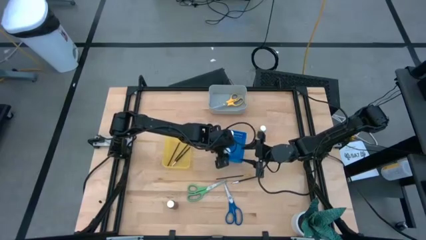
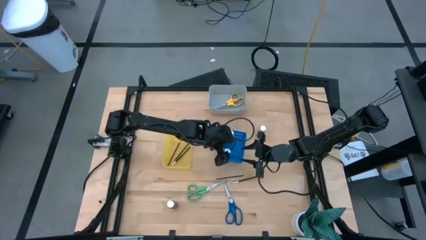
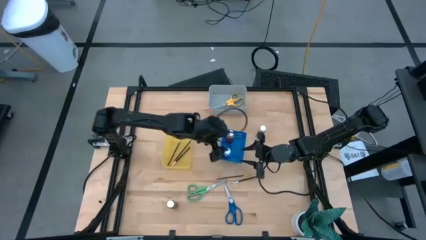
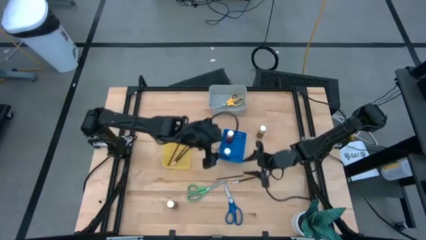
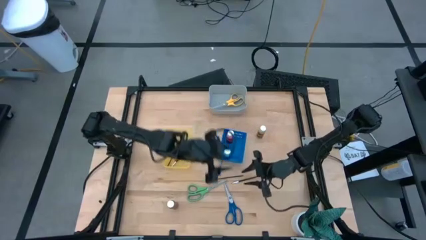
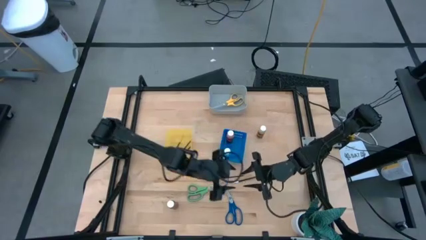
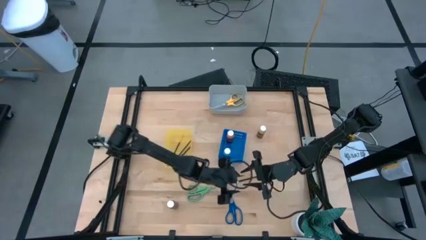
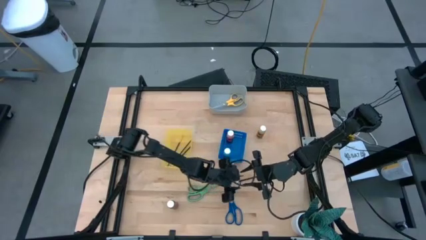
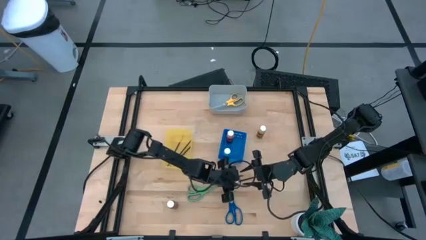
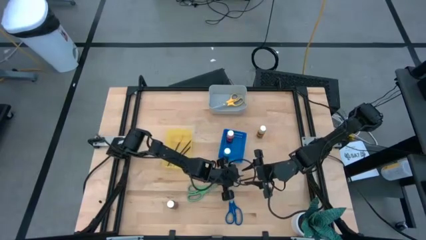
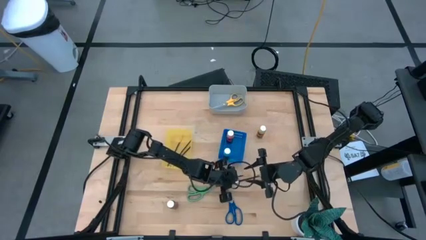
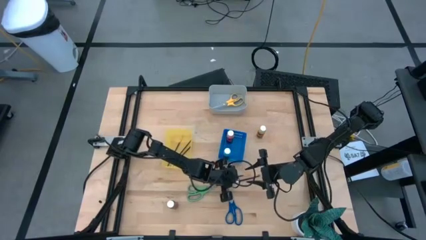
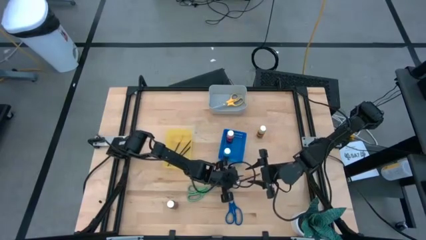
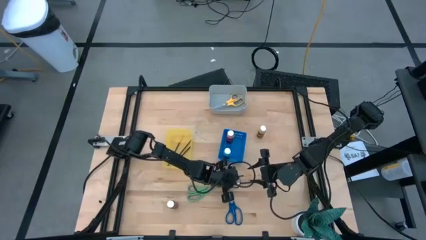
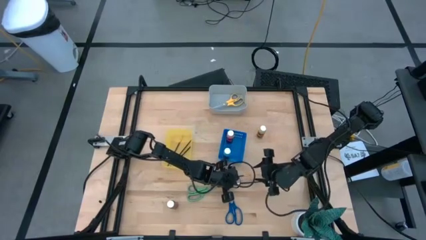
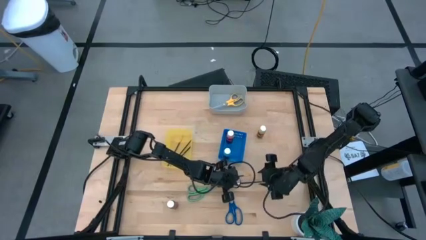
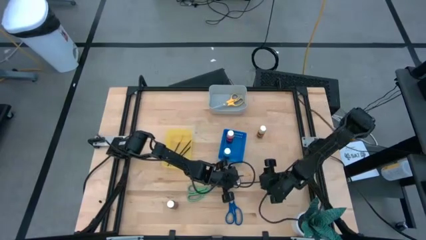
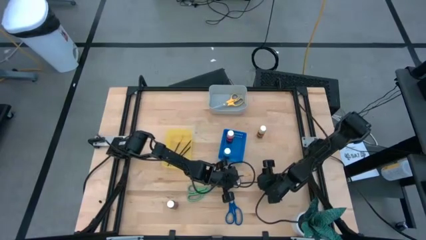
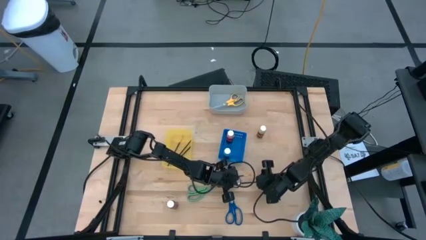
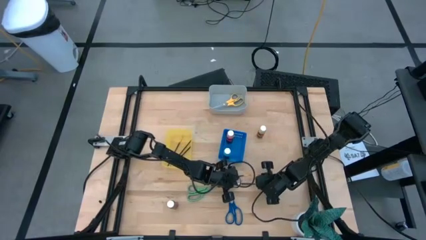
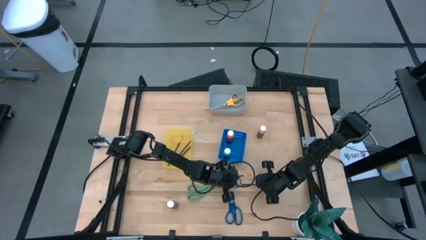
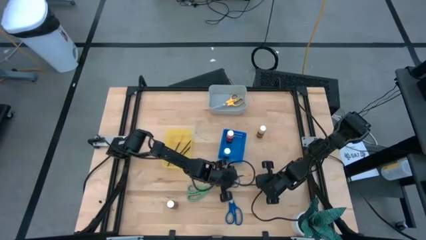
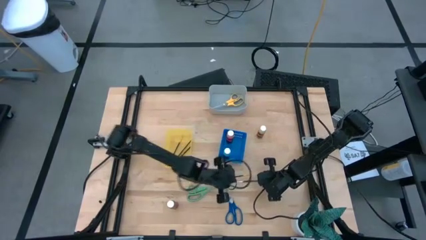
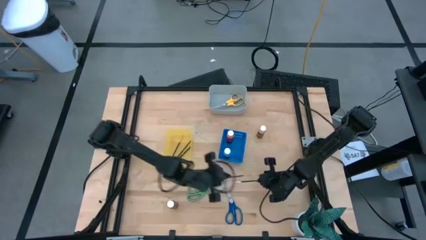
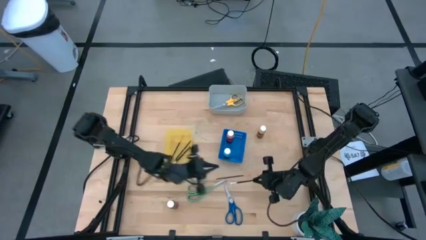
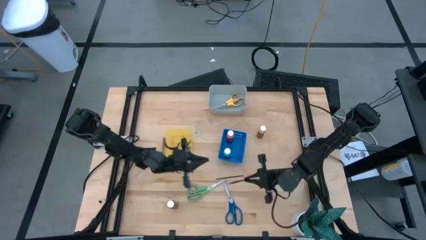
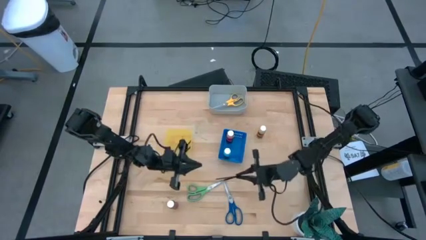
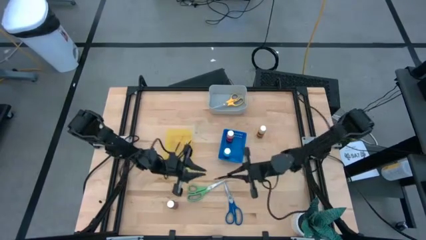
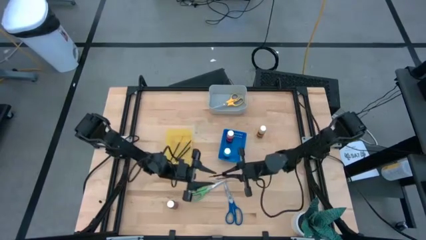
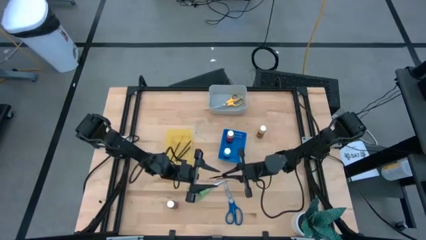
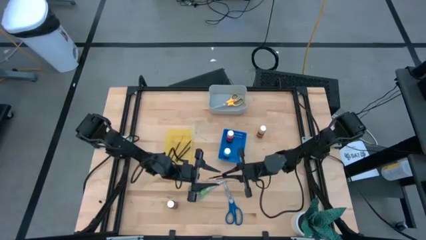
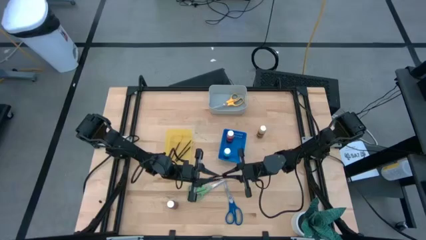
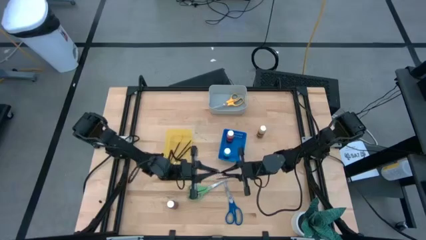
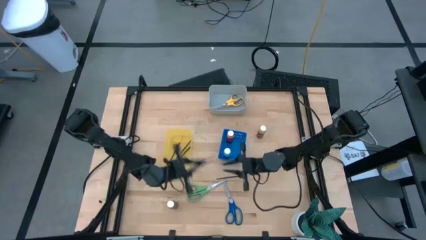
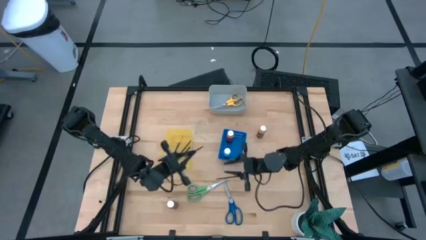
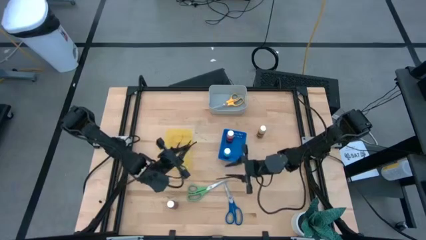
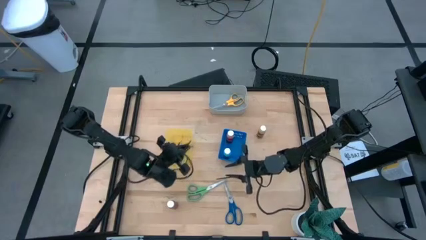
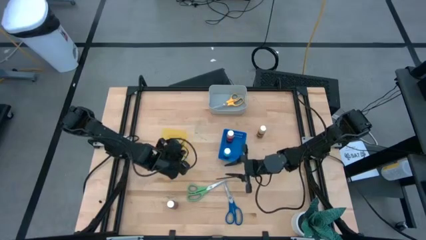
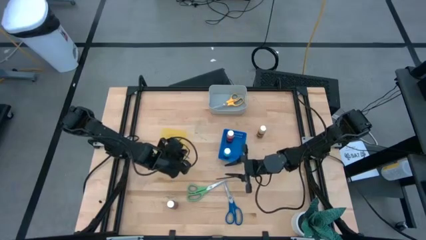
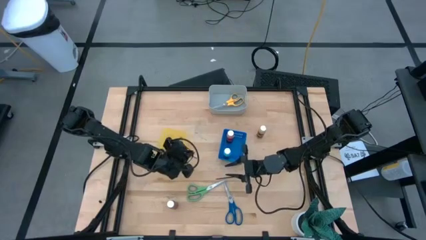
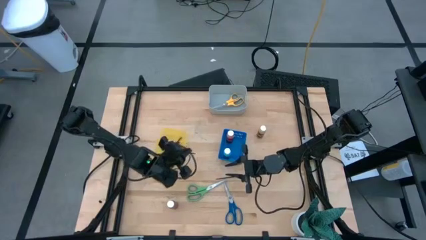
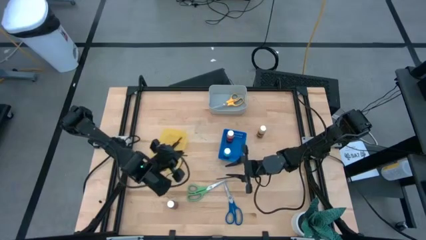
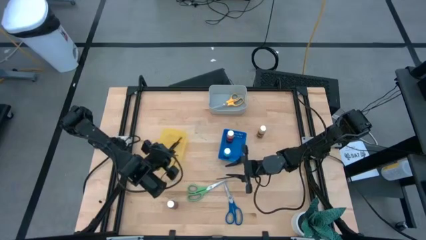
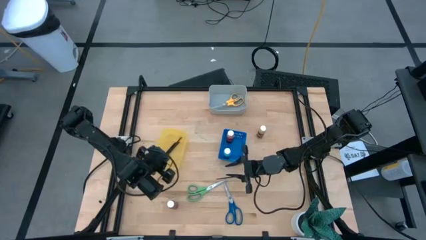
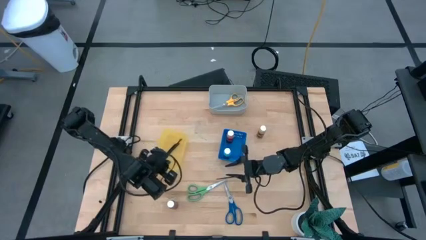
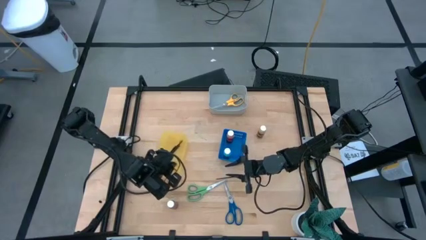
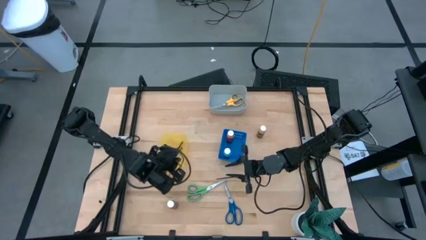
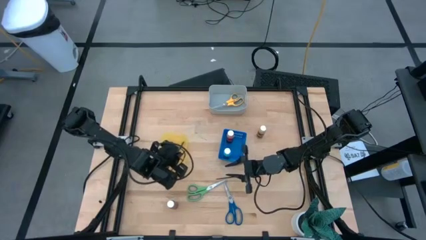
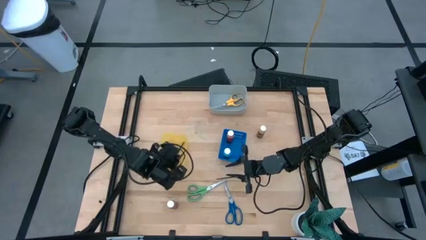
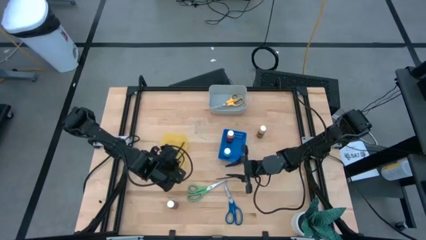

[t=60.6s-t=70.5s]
Task: Pick & Place Paint Supplies
Put the silver paint brush into the yellow bin

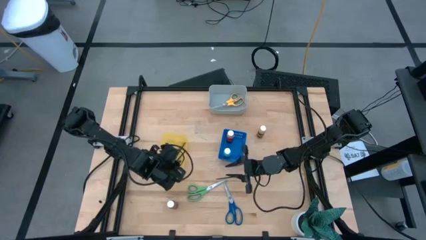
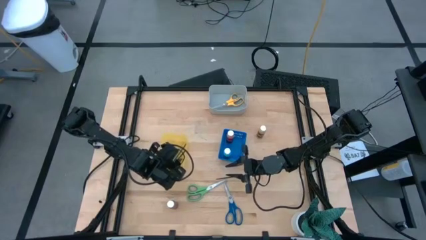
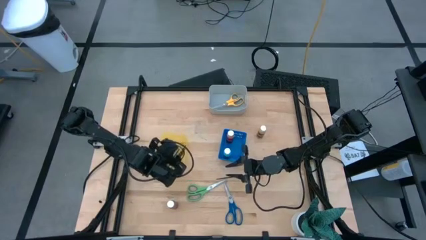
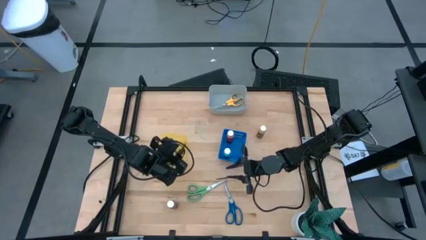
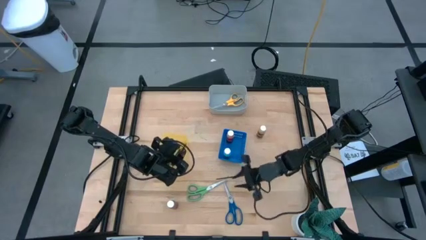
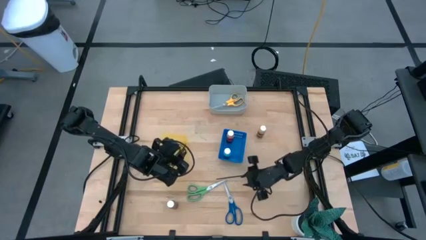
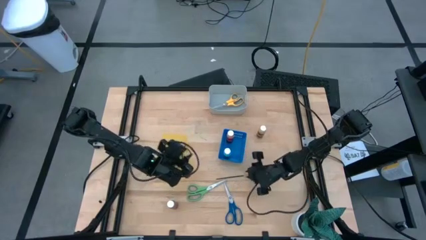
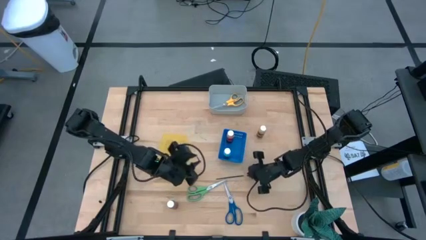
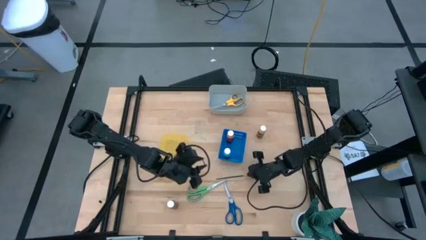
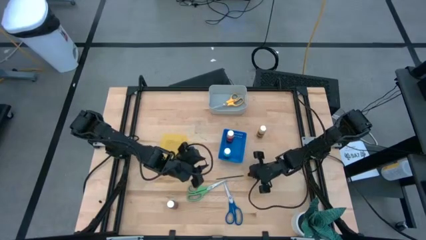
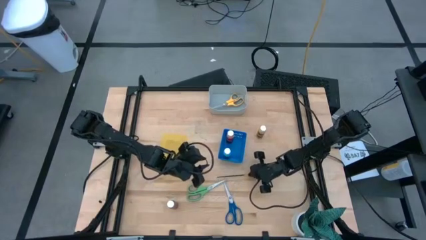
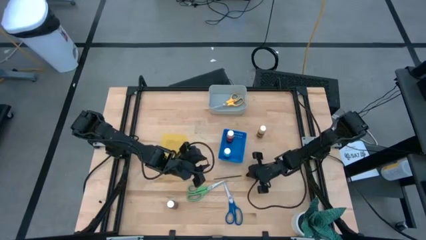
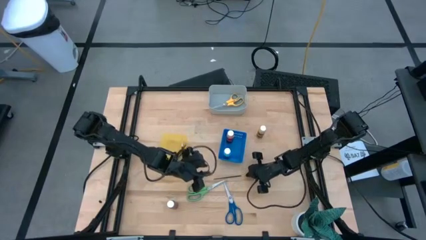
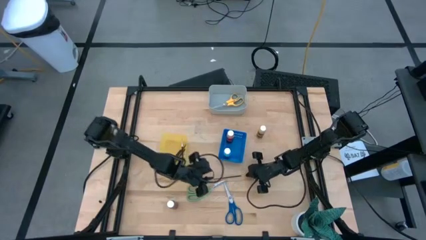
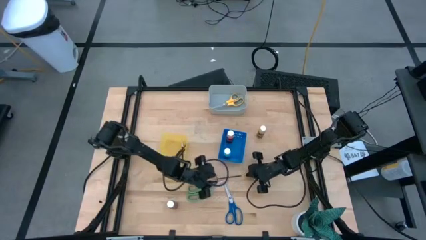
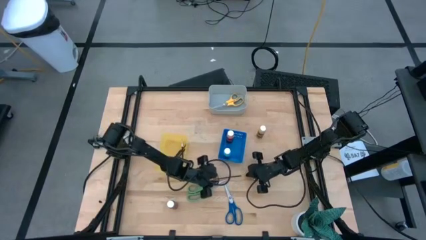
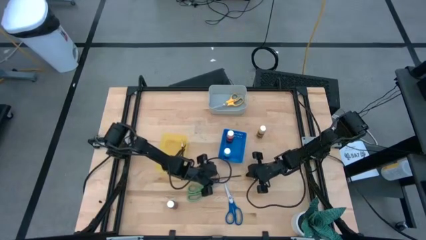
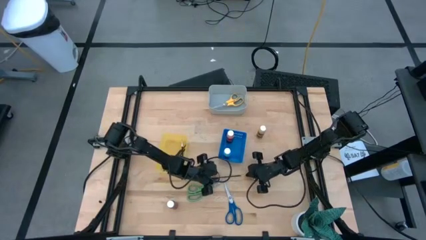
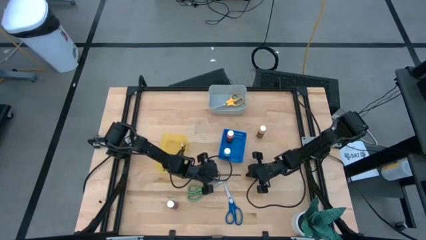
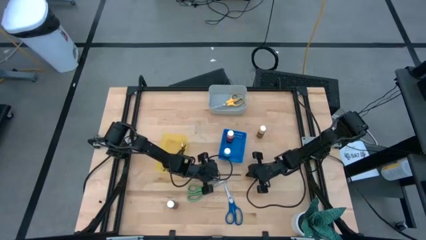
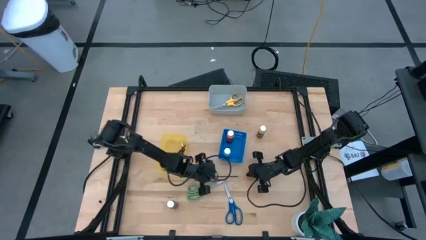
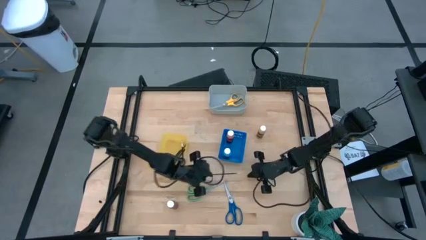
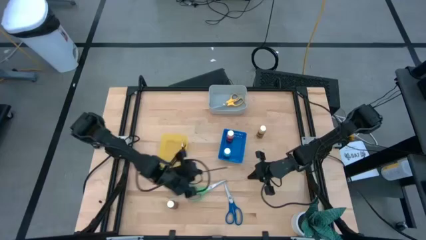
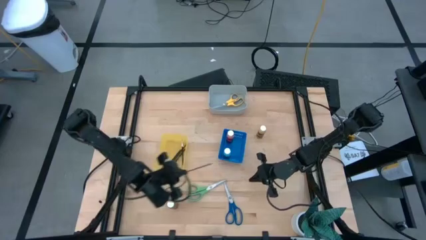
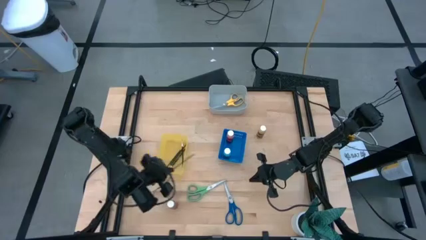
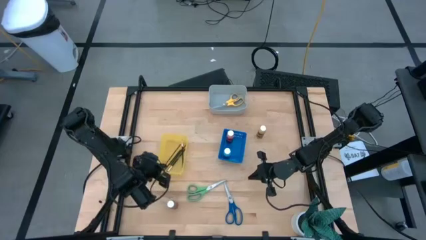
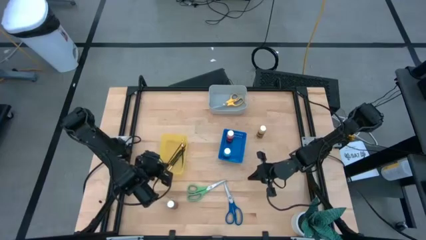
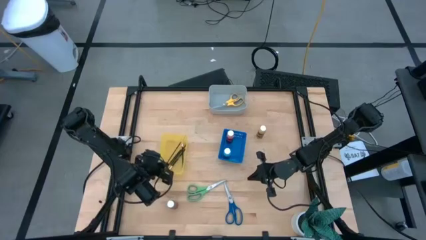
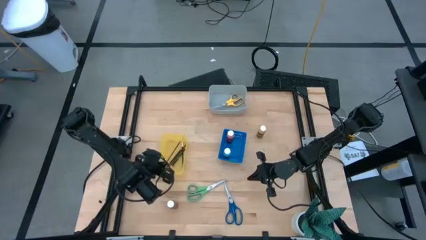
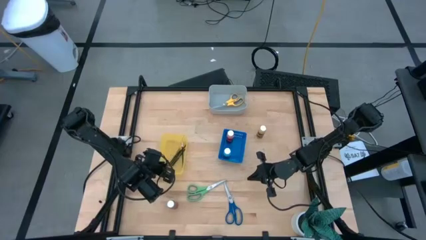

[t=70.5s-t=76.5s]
Put the gold paint brush into the yellow bin

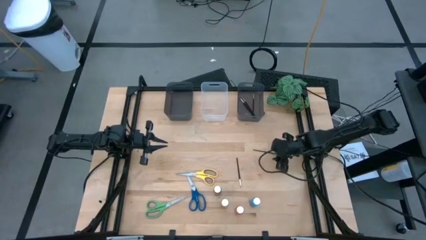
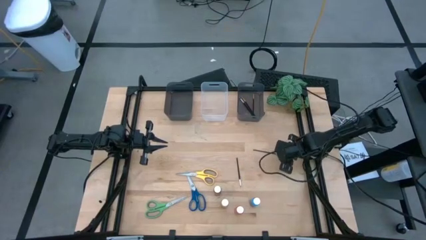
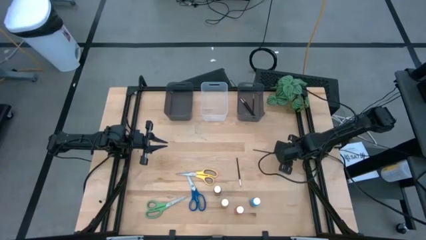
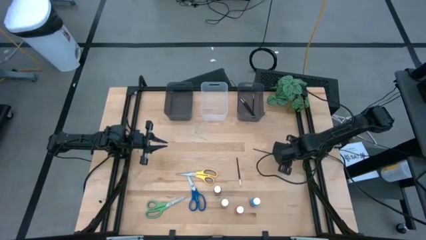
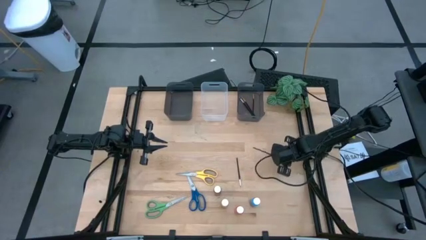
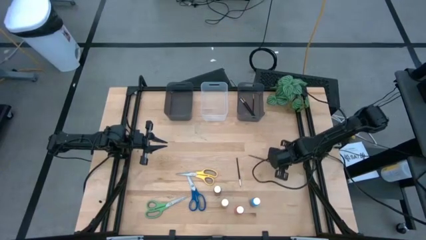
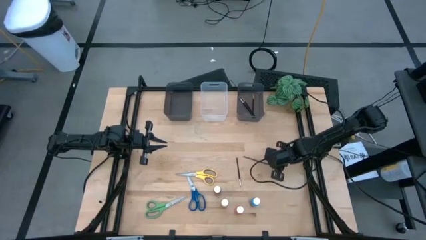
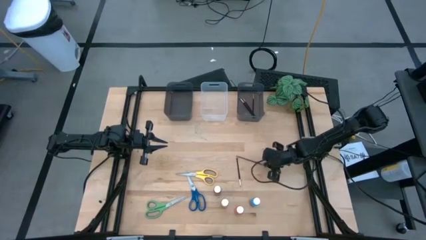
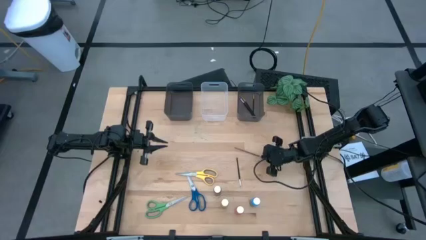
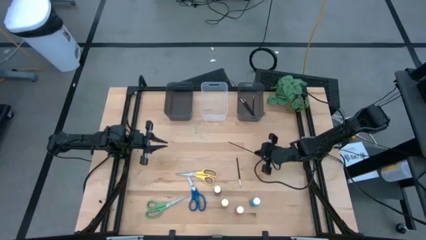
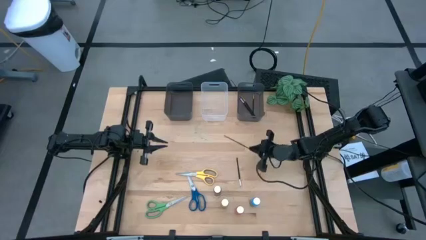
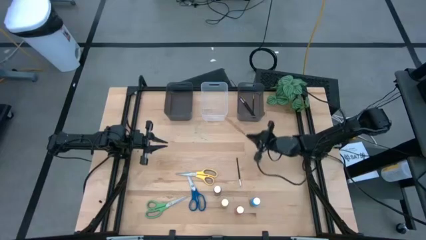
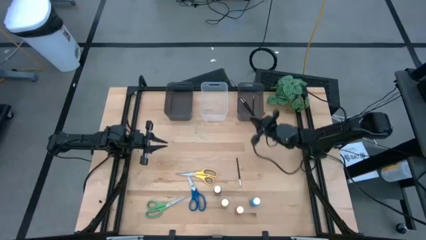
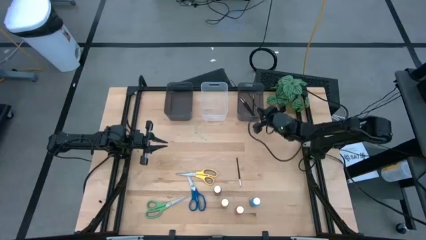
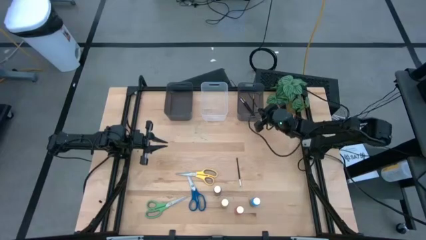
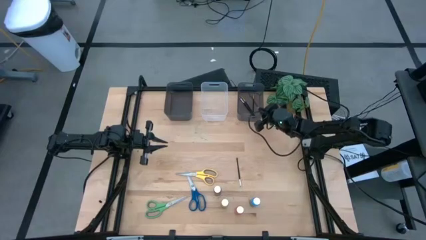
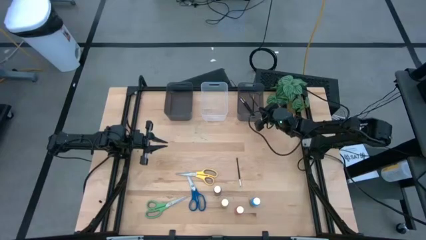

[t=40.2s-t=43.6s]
Task: Pick & Place Paint Supplies
Put the black paintbrush into the right black bin
